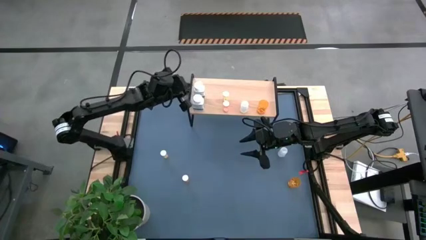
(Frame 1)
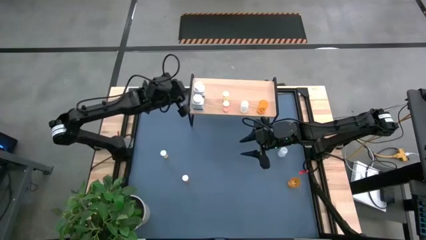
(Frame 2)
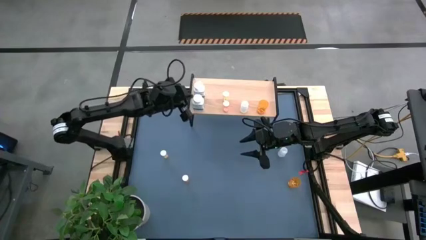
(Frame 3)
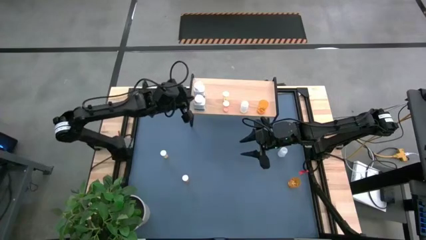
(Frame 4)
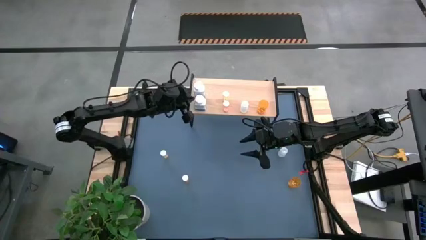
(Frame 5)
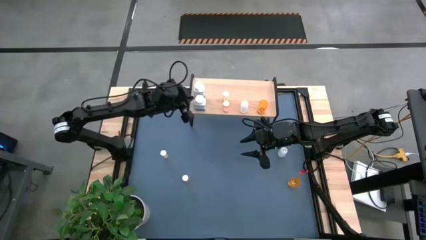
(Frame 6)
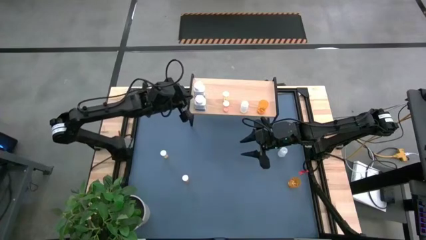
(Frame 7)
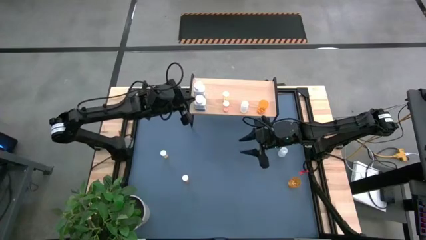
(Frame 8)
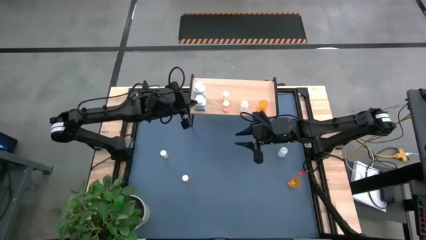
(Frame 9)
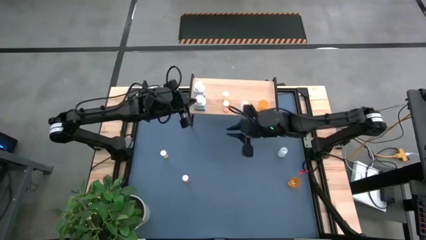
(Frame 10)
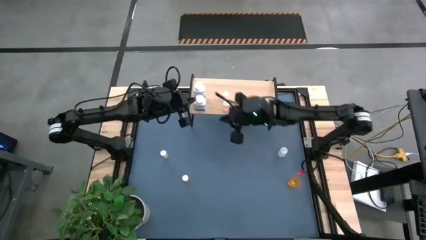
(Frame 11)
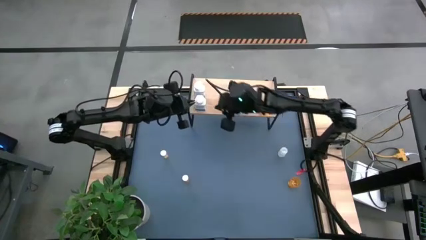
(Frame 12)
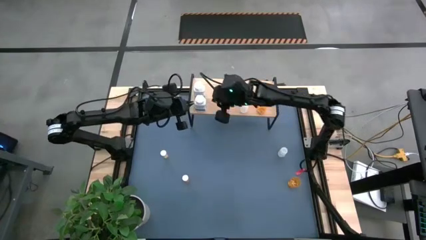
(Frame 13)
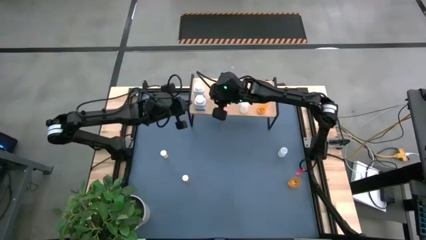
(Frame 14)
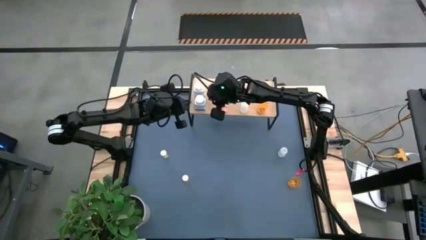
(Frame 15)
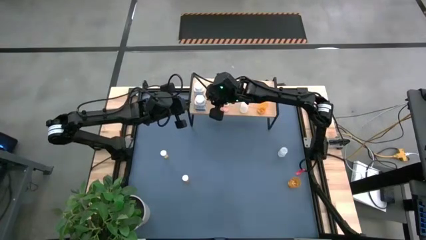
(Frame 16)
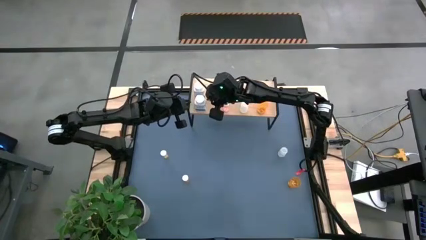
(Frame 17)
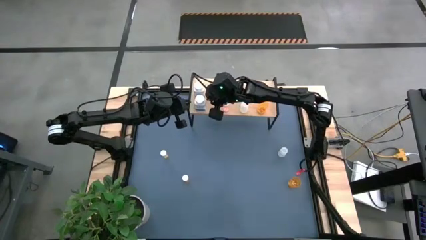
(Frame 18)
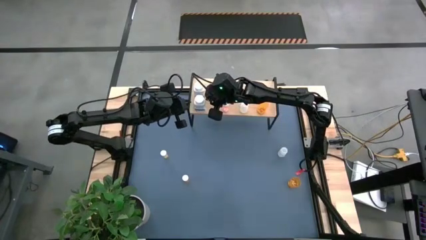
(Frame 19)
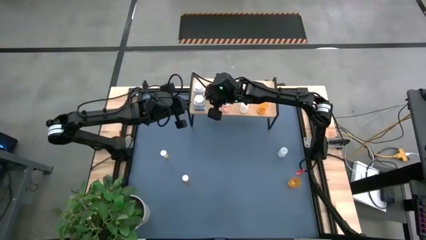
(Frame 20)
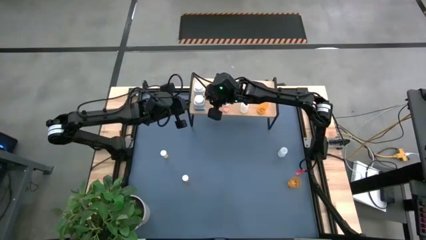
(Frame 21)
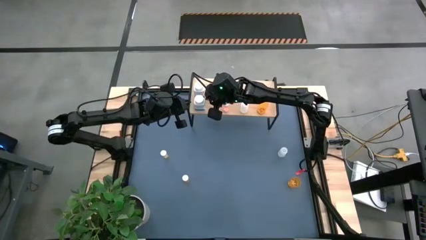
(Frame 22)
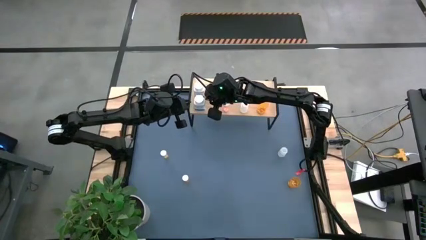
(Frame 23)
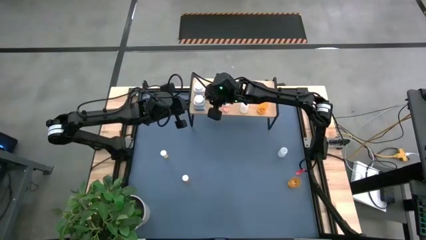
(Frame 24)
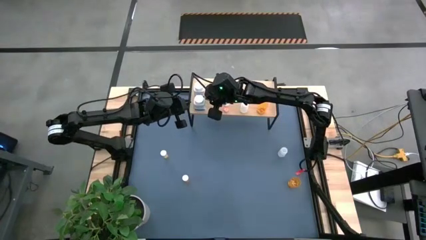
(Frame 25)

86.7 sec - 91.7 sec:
Task: Pick and place medicine bottles onto shelf by color
Adjust the white pill bottle on the shelf

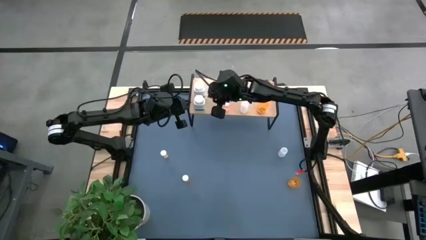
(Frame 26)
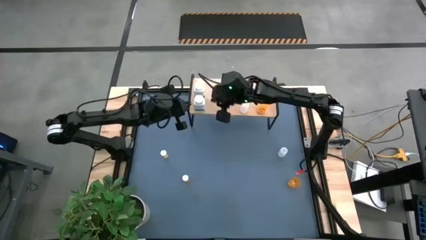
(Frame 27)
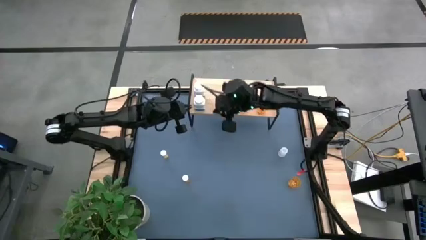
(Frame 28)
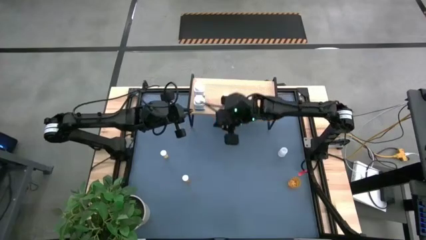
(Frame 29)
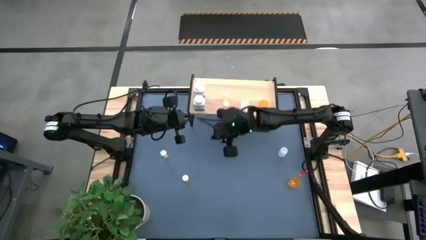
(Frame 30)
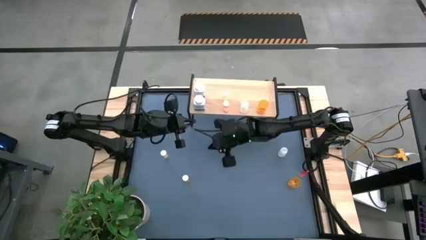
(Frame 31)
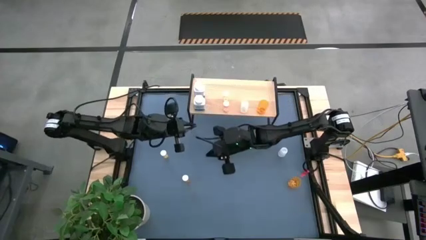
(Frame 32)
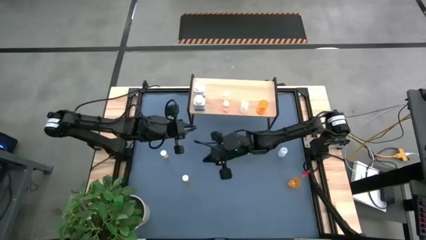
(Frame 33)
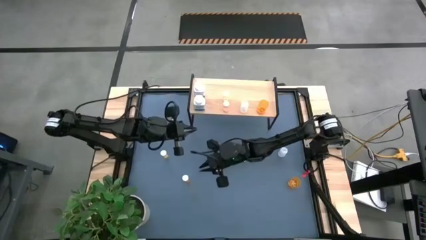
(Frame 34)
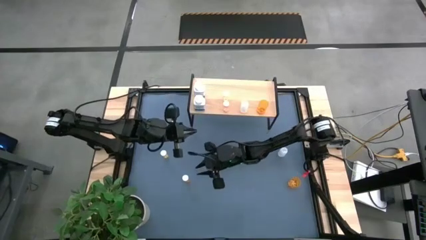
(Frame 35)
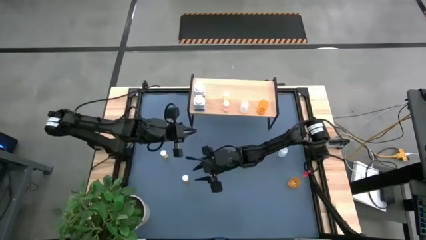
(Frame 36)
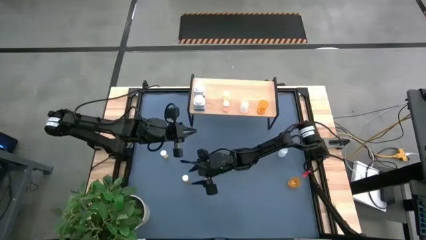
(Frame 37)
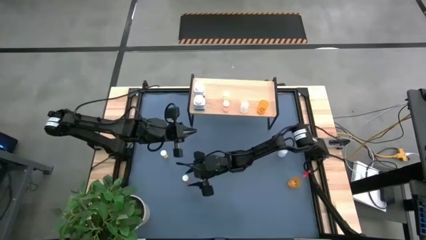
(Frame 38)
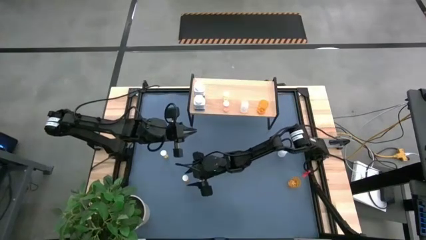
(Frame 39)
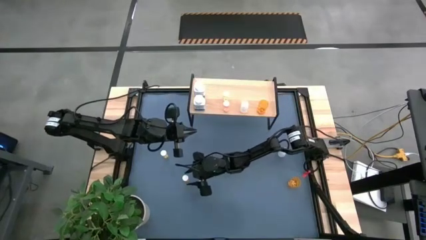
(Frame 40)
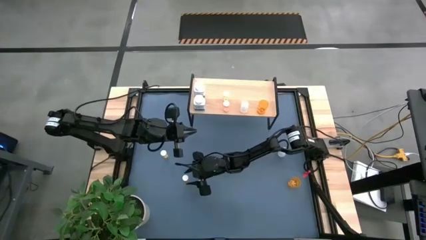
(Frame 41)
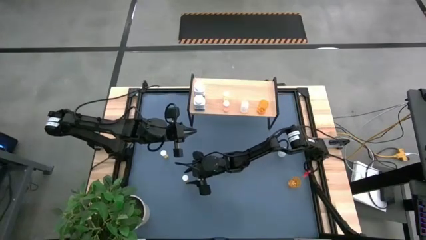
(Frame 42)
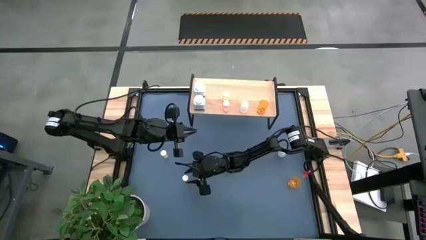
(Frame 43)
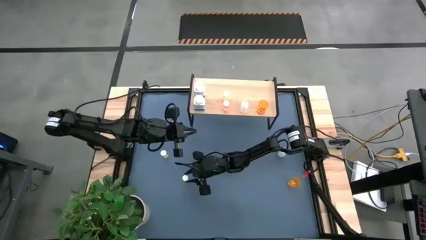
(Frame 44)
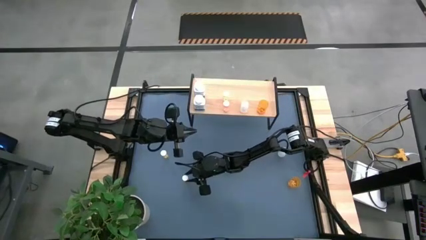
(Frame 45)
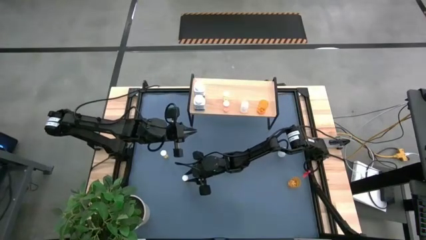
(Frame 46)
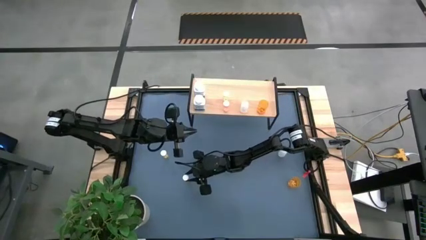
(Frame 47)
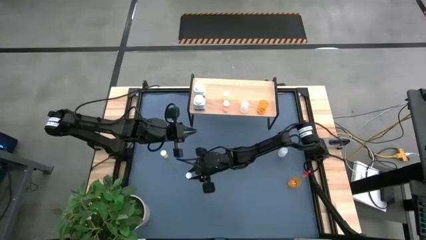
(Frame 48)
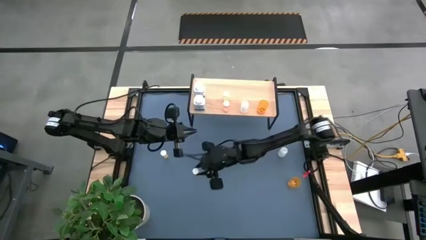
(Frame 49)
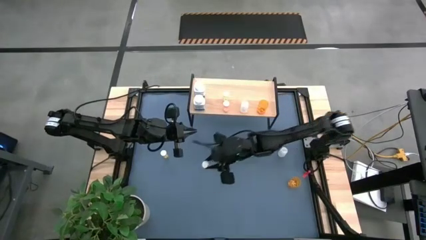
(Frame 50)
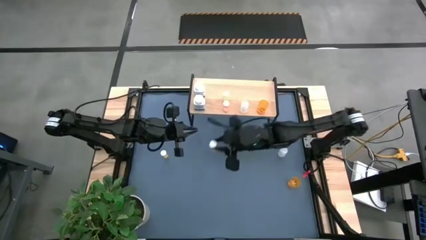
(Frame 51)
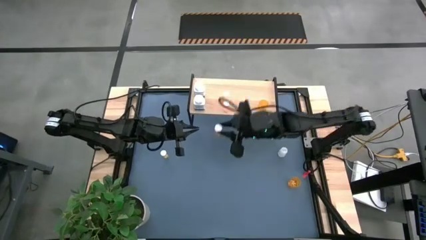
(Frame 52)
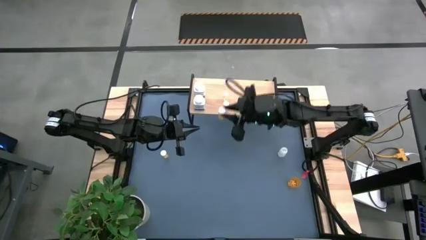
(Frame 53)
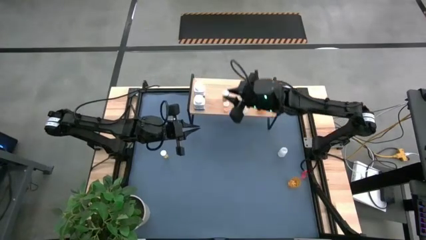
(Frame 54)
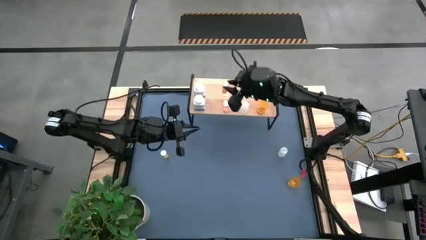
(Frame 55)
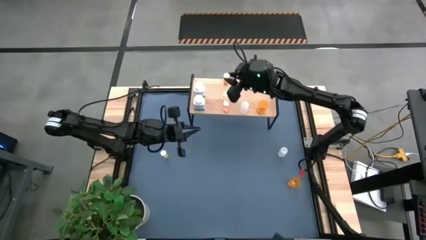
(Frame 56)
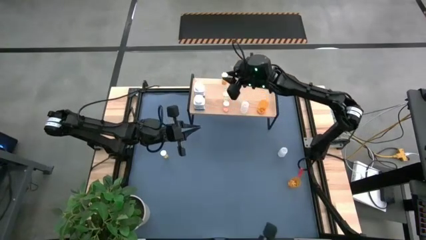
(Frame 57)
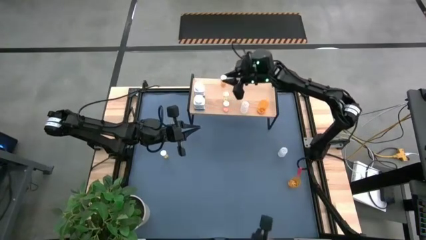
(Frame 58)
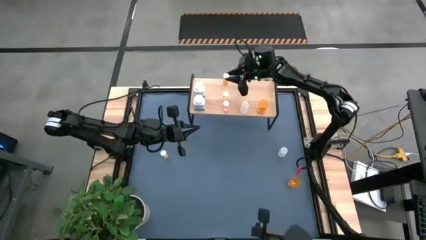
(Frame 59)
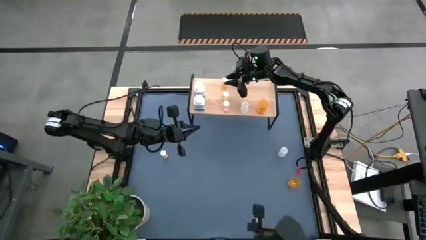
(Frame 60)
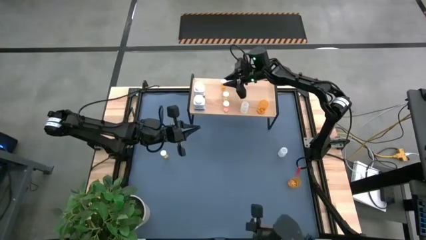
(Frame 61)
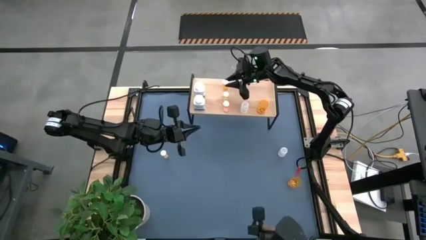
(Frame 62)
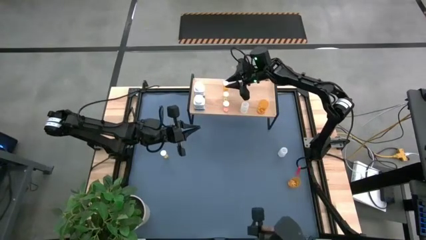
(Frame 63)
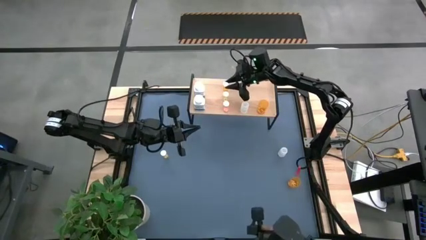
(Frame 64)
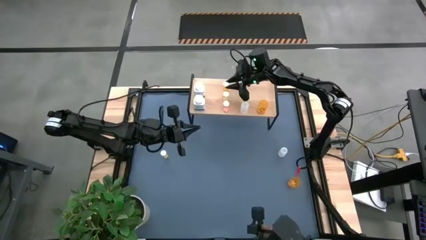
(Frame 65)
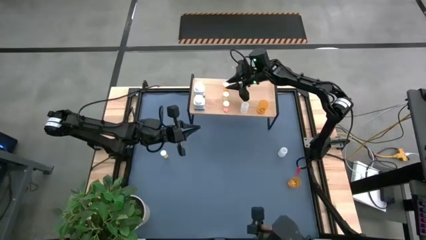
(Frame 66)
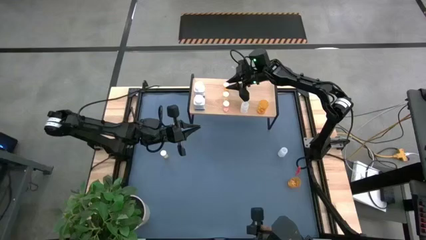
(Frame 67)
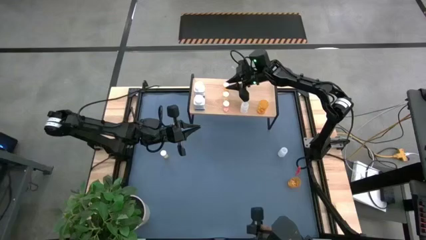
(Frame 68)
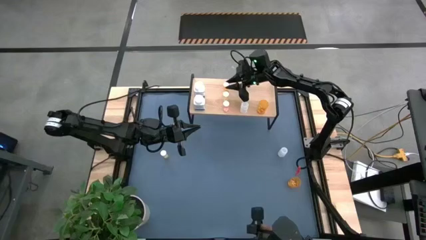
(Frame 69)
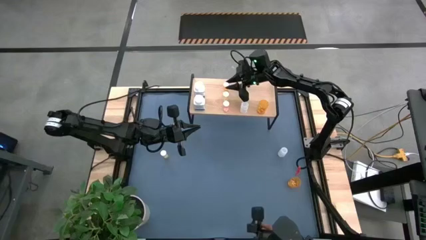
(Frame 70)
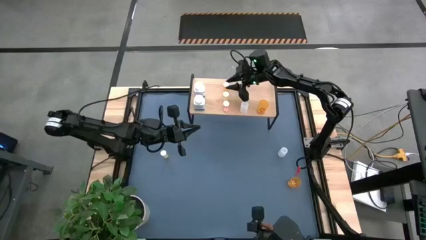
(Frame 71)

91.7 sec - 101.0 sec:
Put the orange pill bottle on the shelf

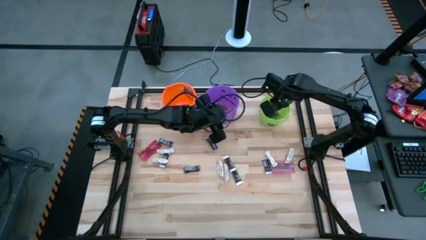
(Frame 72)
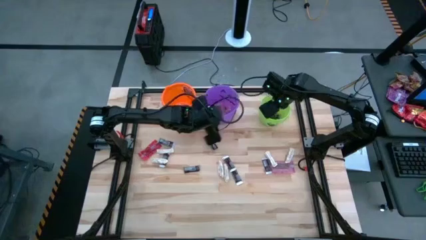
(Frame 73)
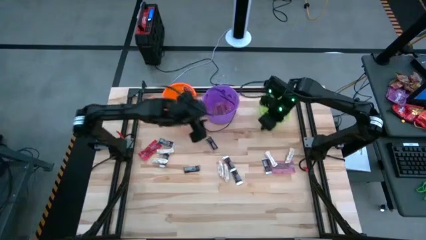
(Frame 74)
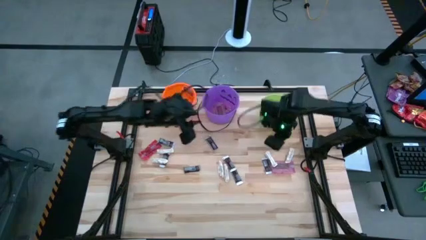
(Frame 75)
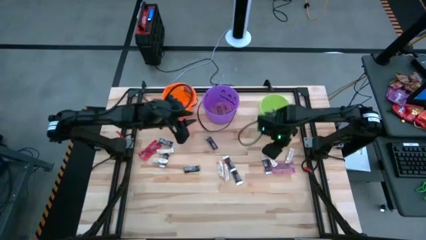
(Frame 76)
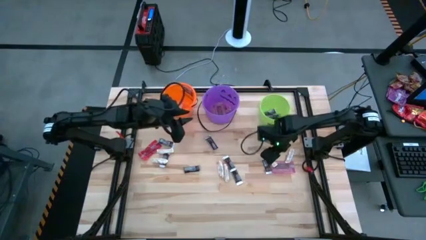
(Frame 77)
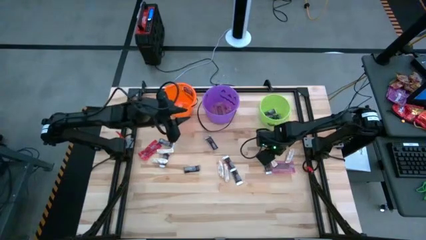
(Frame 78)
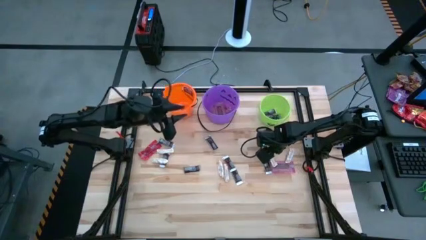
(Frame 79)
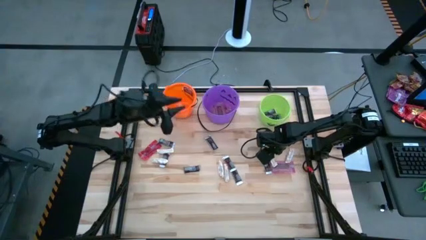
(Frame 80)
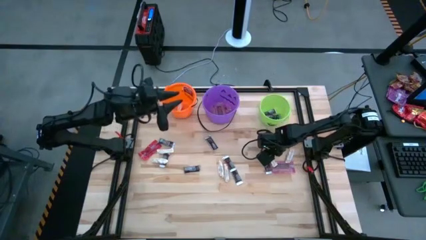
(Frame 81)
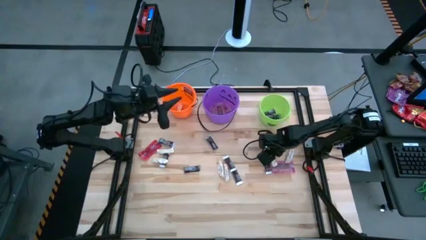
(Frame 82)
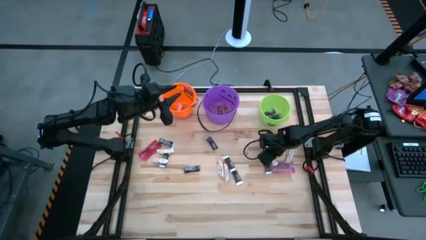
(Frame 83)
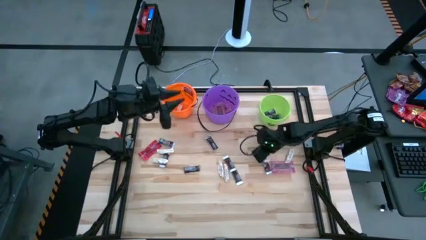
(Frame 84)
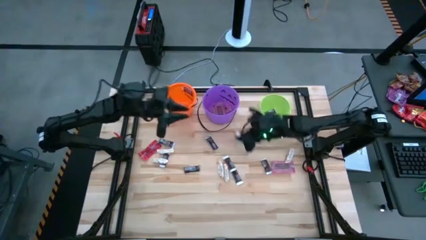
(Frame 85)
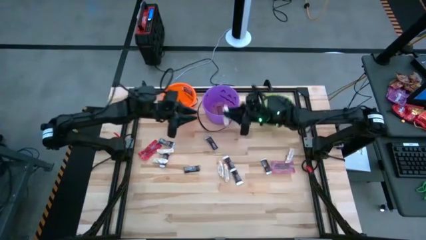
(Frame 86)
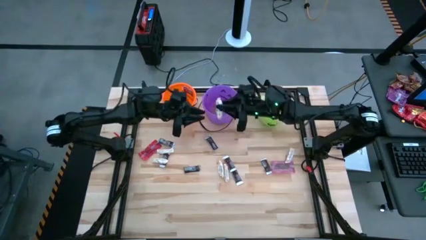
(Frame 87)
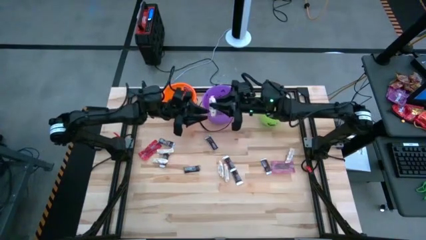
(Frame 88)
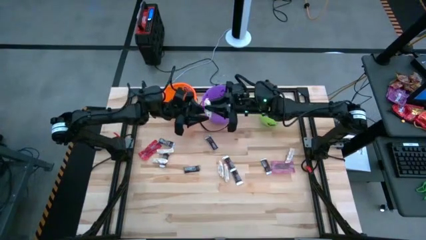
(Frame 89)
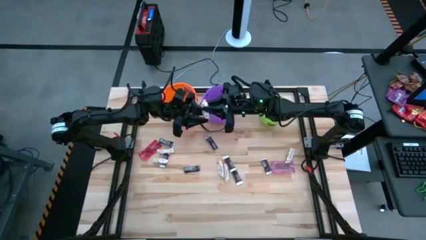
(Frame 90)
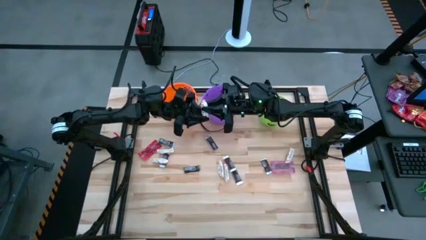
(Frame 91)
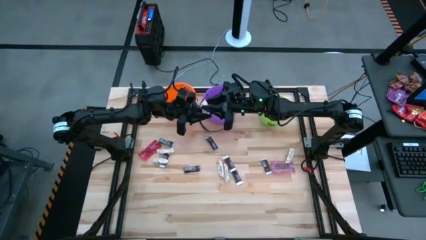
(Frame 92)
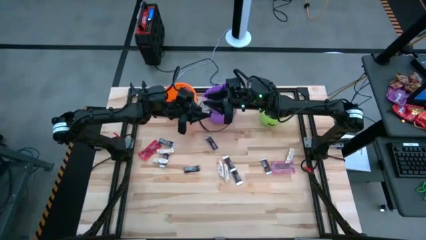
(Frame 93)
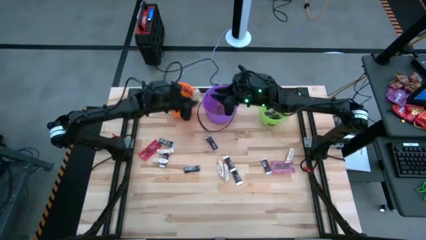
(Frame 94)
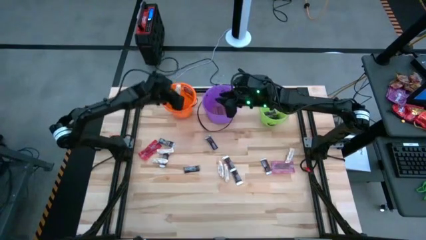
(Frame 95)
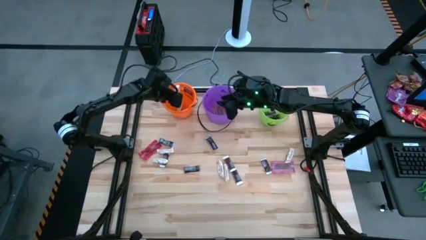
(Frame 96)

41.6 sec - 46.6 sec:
Task: Sort candy by brand, put in halloween buckets
Put the white chocolate bar into the orange bucket
